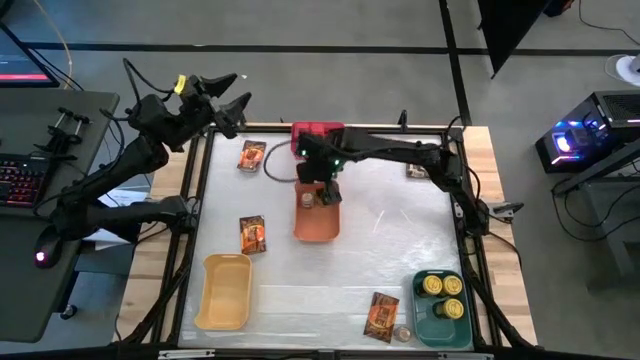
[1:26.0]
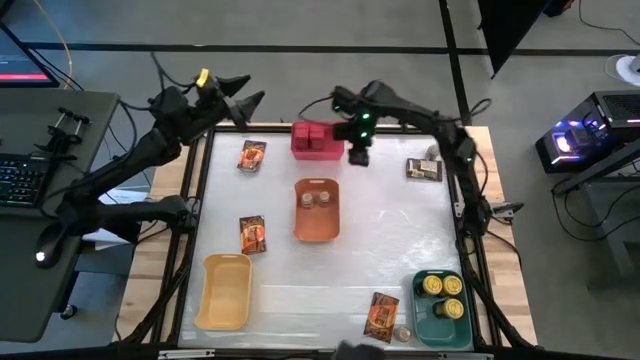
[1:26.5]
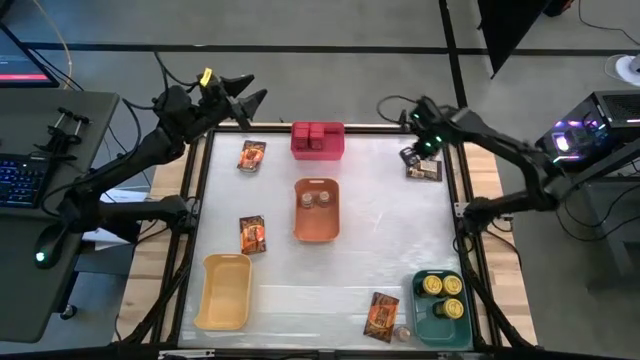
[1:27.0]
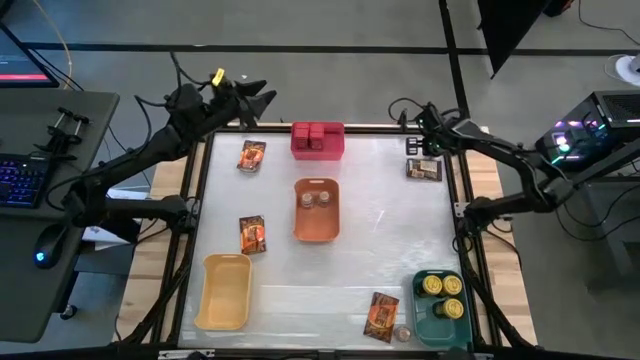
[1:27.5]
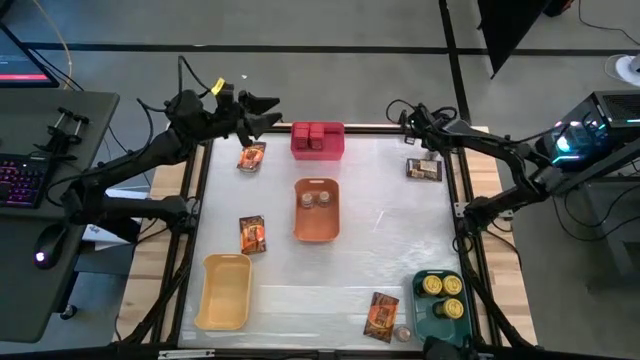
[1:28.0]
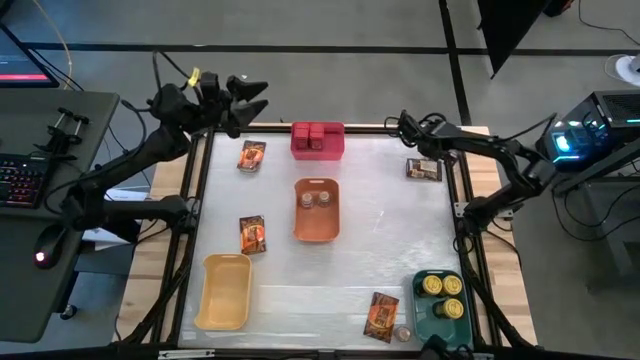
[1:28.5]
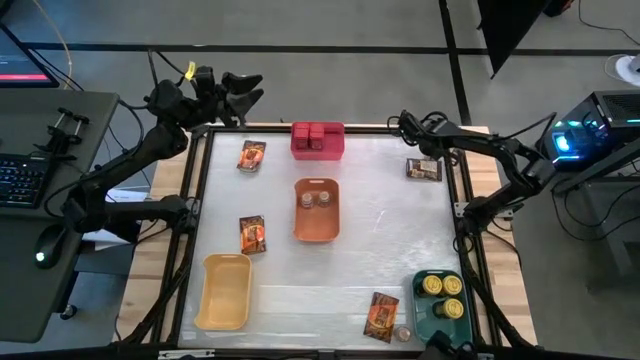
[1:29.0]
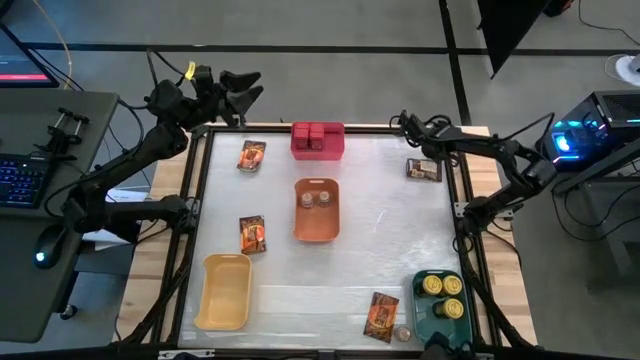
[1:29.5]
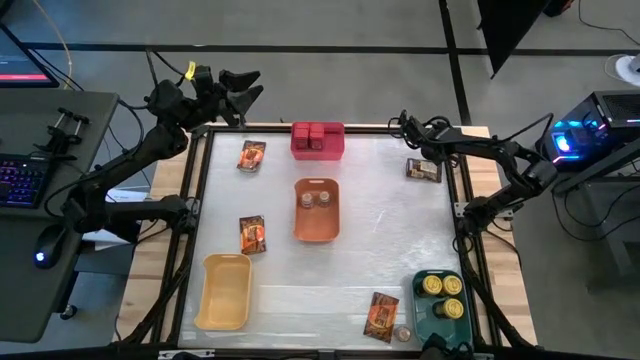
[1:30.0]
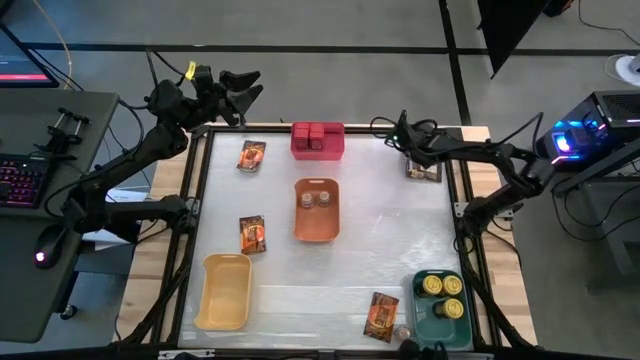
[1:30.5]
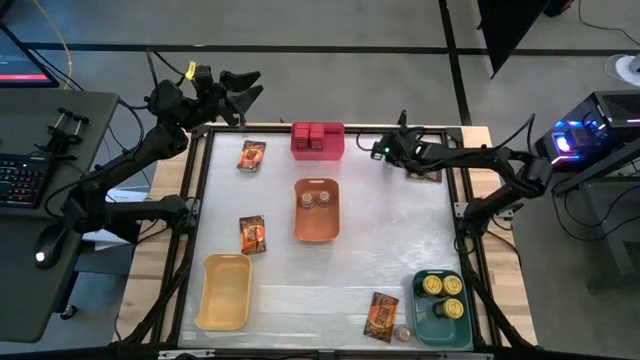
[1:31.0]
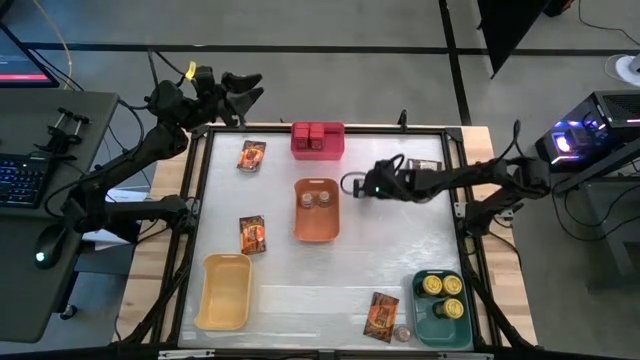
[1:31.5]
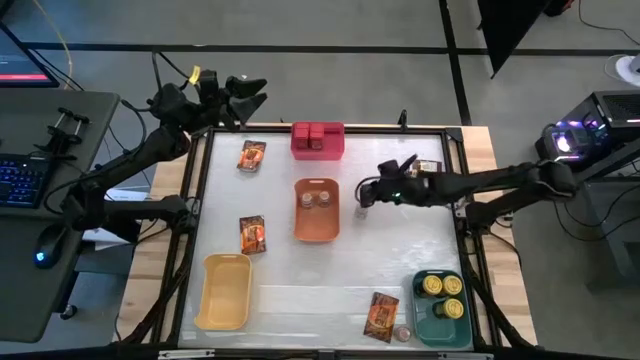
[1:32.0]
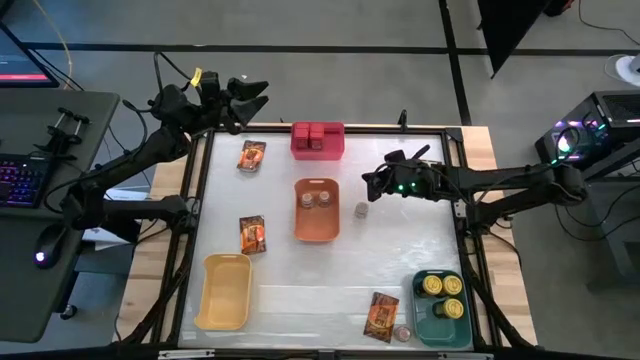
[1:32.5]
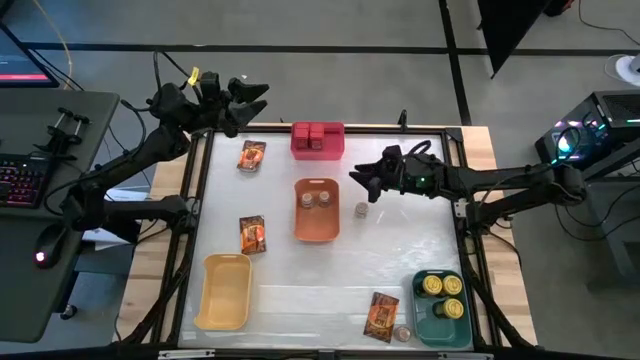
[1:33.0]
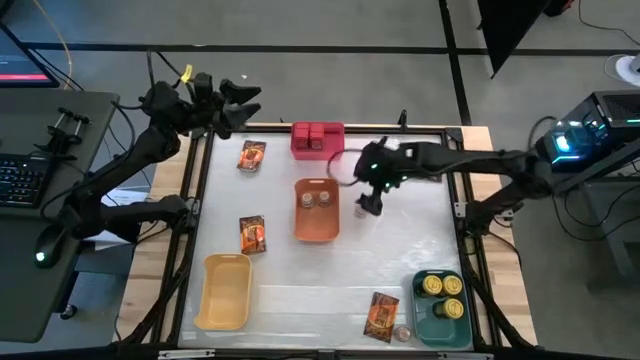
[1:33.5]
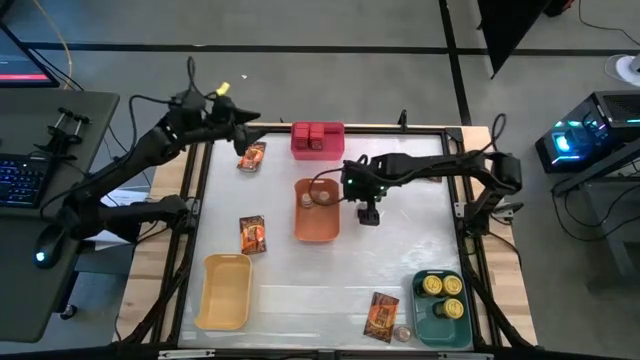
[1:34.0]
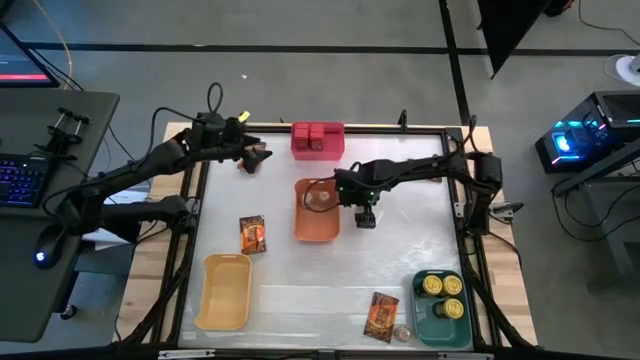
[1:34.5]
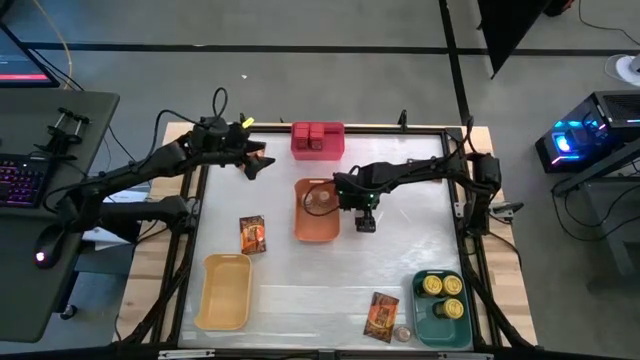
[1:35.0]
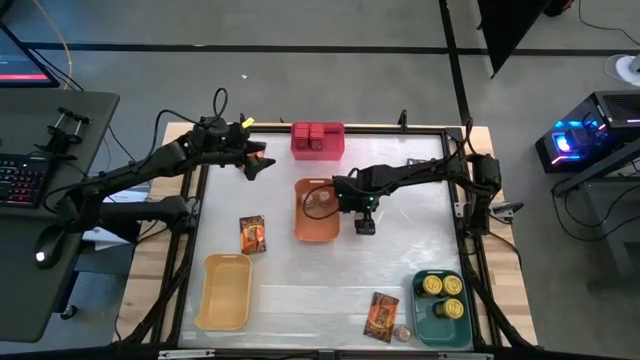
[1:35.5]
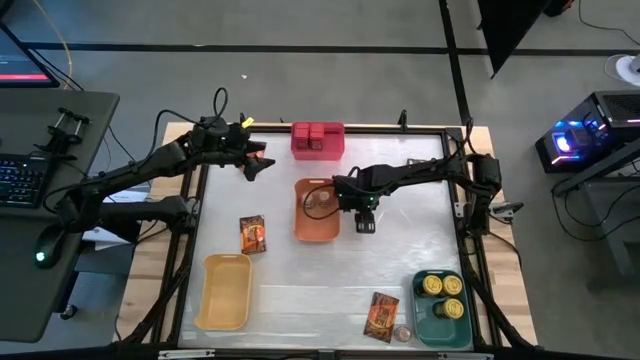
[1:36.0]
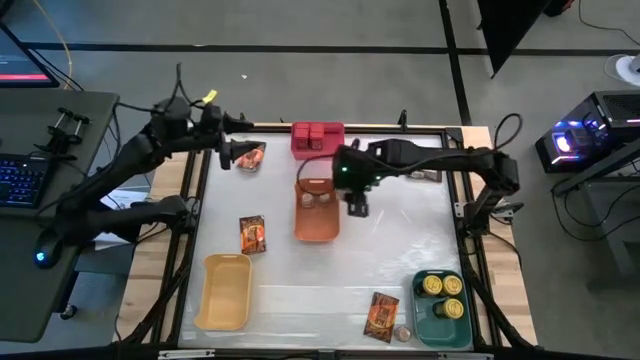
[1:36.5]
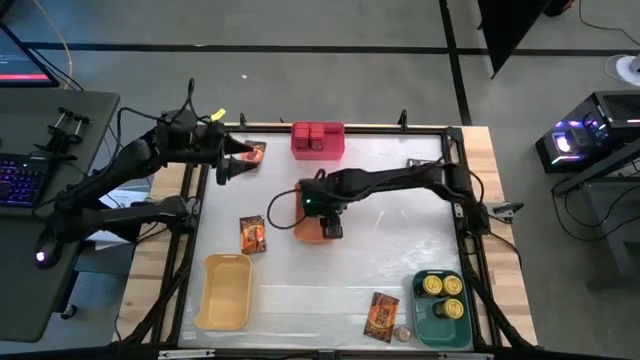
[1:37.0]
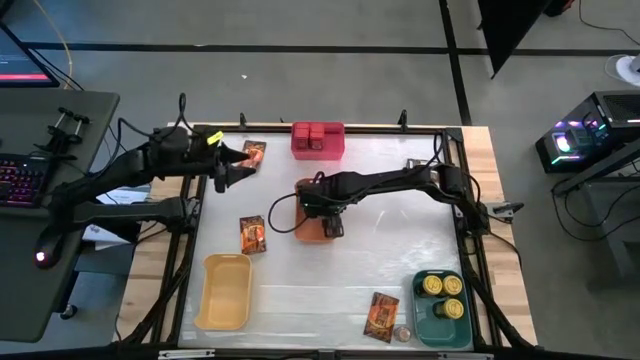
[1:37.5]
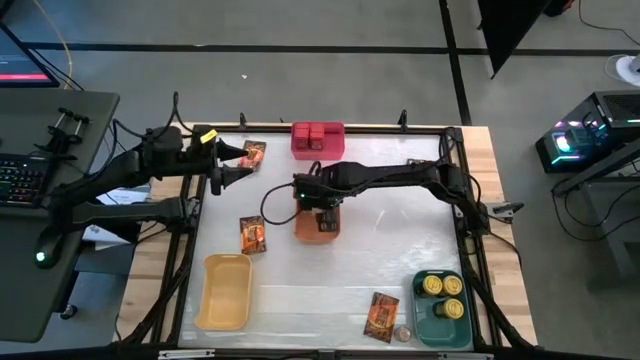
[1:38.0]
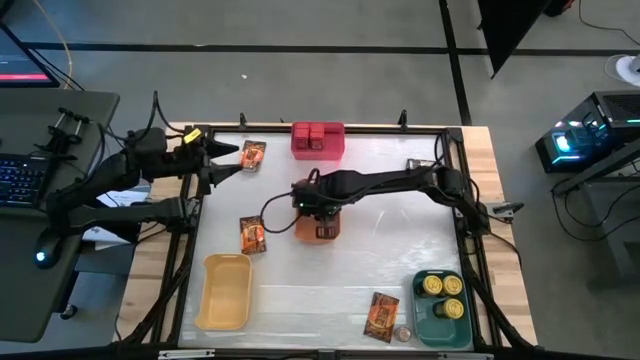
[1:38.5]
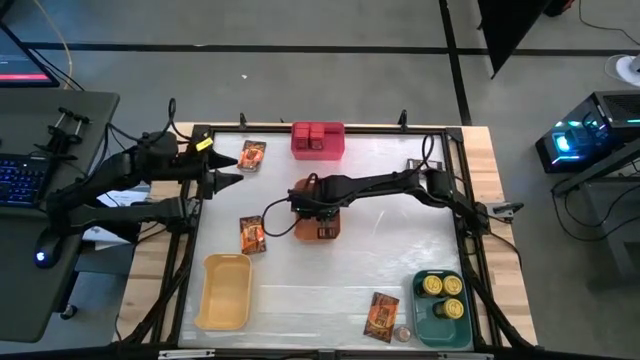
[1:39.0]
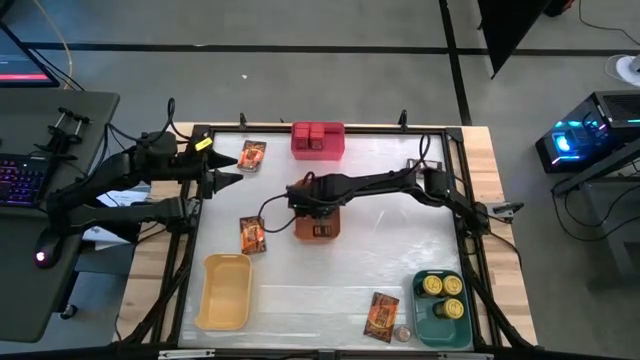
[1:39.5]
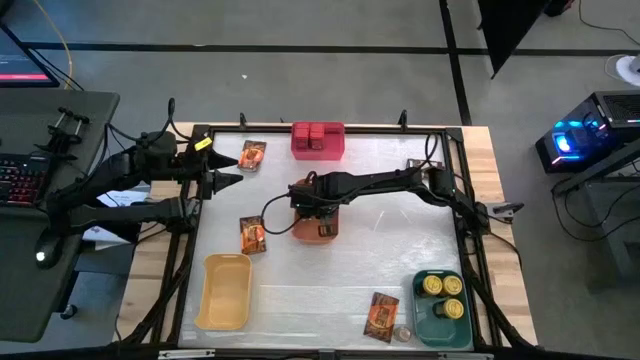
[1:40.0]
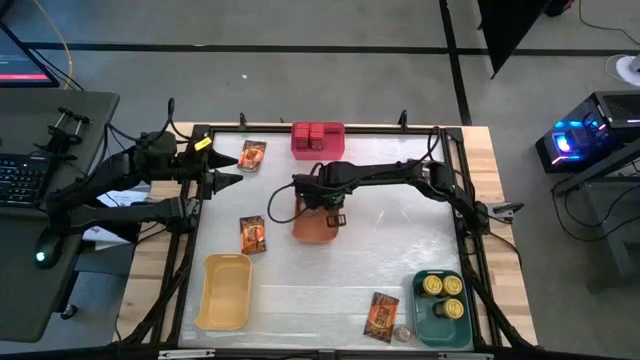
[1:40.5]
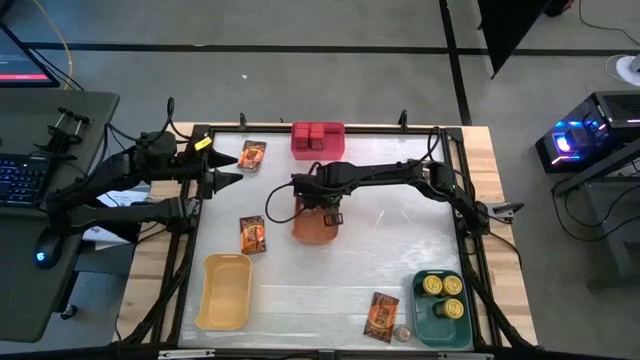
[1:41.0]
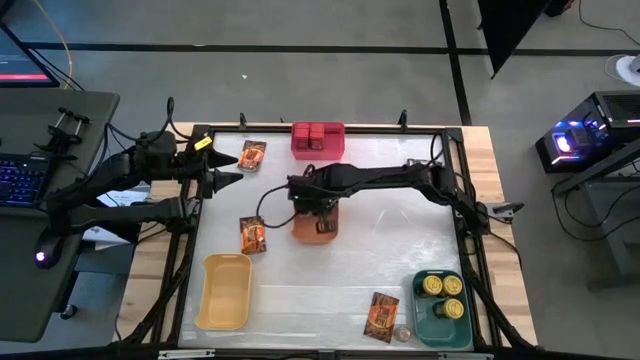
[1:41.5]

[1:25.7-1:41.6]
Task: Sort spices by type
Put the top brown spice bottle into the orange bin

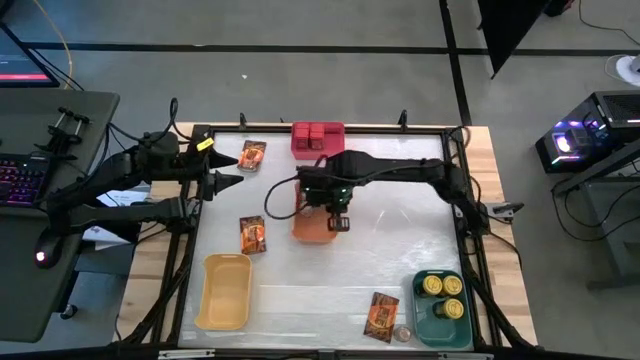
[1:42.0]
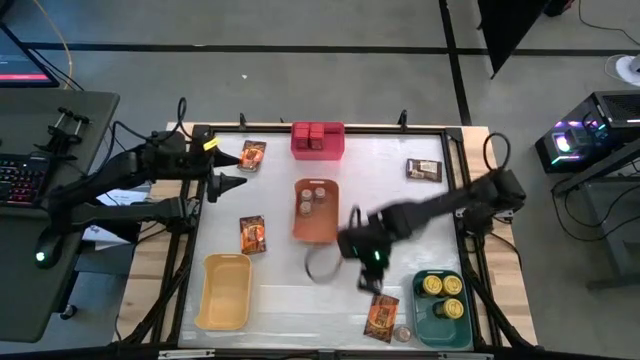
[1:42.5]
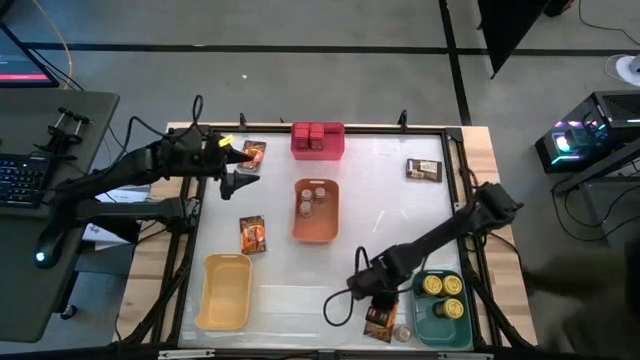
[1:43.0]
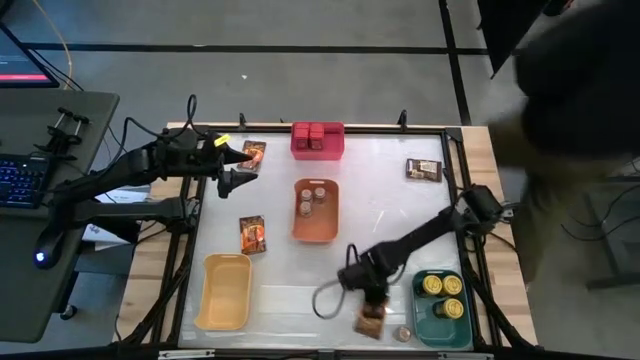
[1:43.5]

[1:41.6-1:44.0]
Adjust the orange spice pack

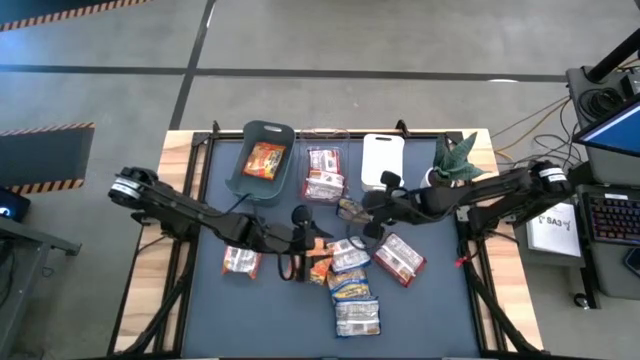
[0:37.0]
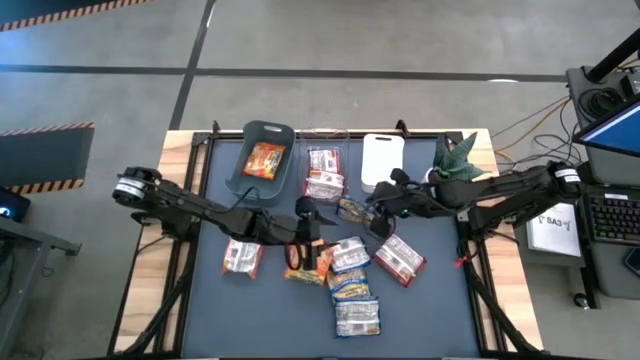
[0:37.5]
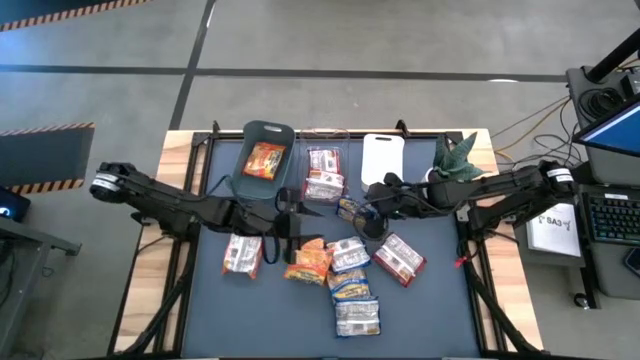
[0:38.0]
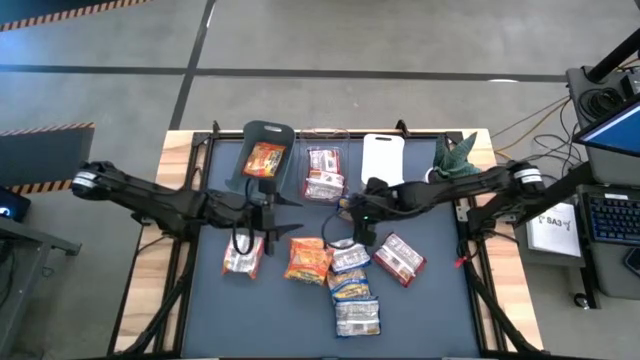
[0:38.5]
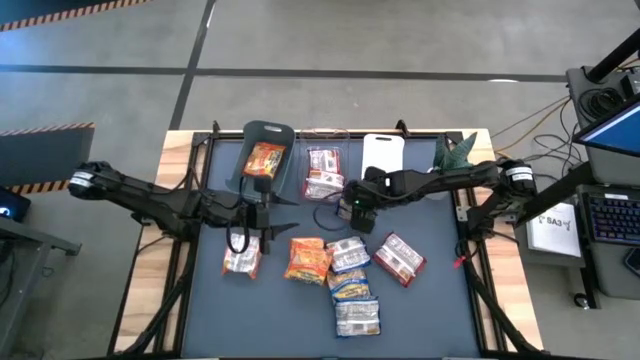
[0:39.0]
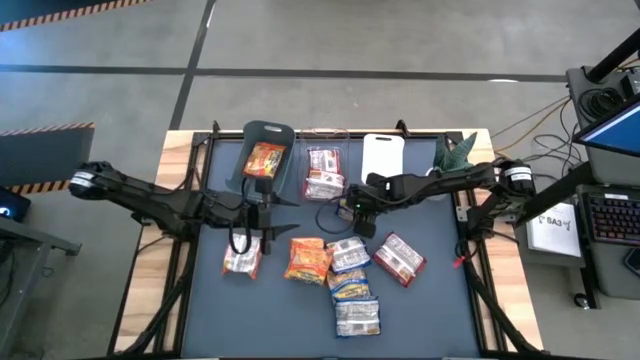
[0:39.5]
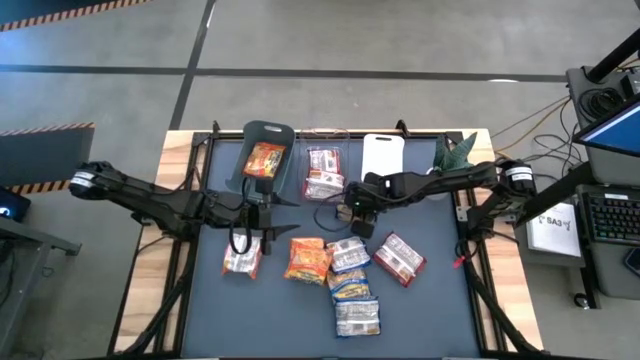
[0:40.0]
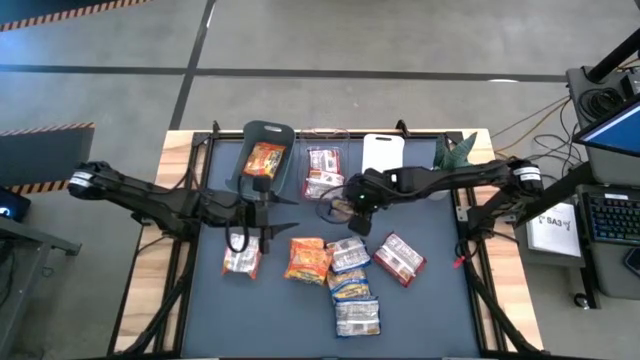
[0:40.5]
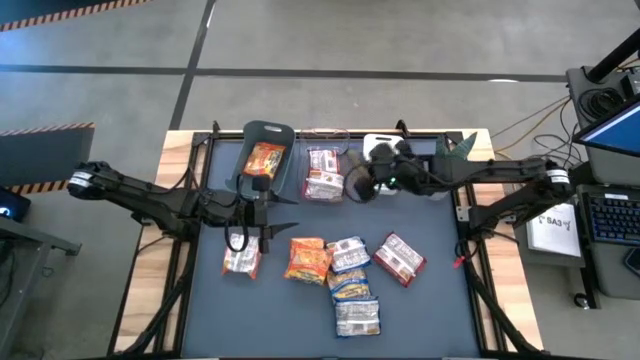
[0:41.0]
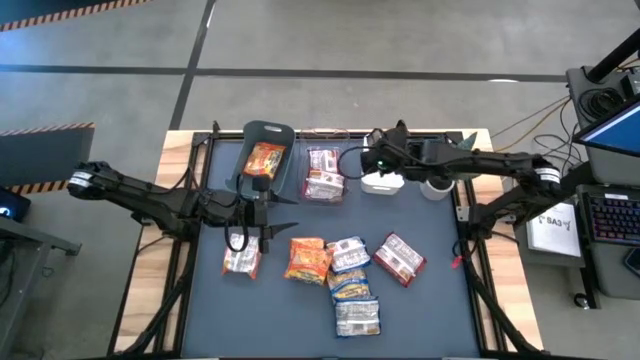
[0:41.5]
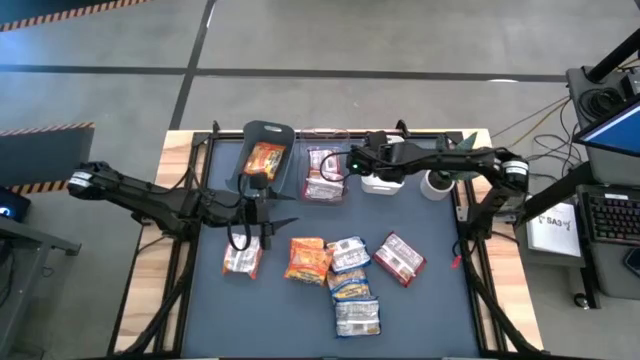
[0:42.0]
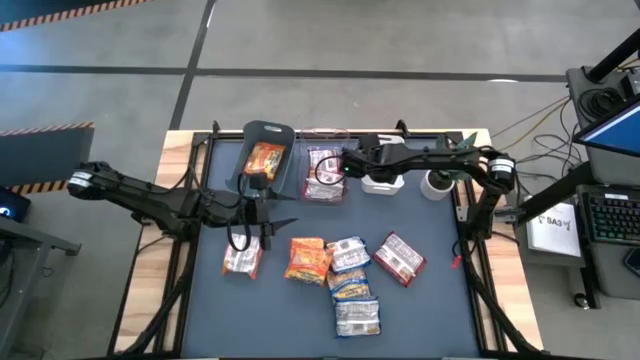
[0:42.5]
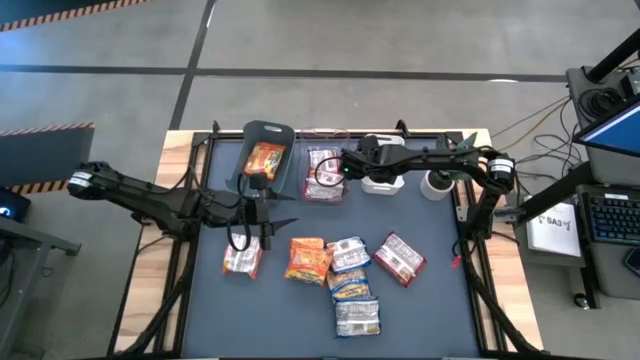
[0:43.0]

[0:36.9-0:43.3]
Task: Sort Maruchan noodles
Put the blue noodle pack into the white bin
